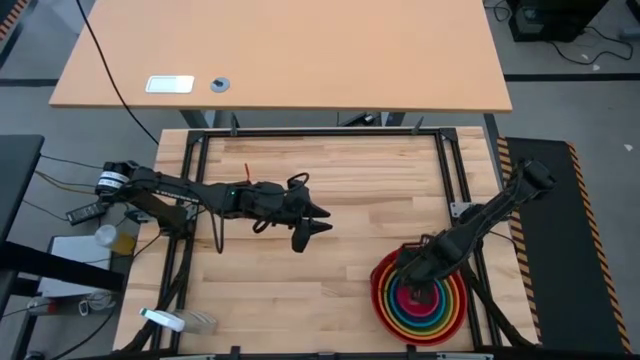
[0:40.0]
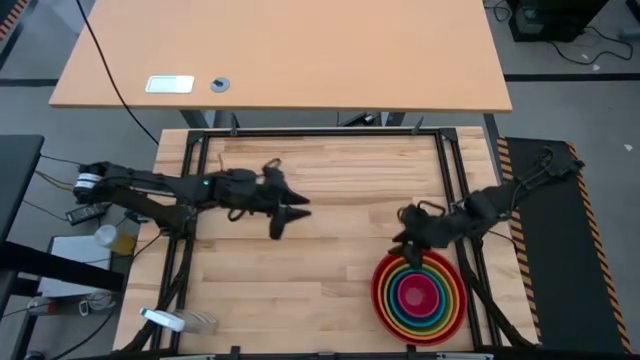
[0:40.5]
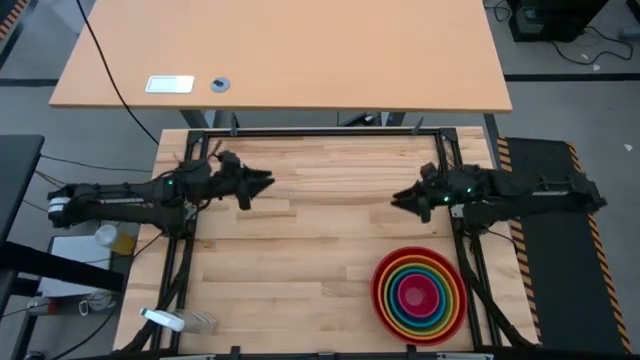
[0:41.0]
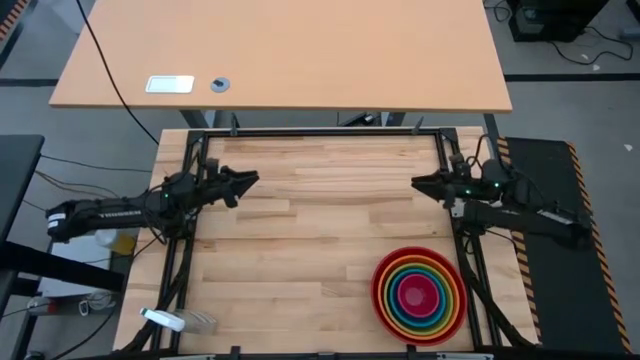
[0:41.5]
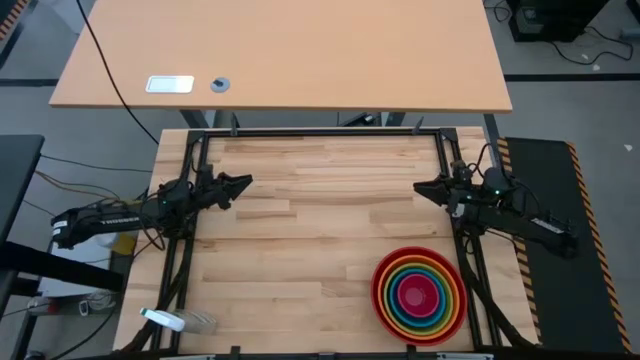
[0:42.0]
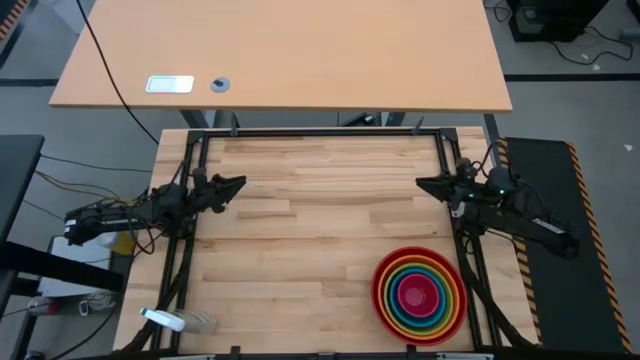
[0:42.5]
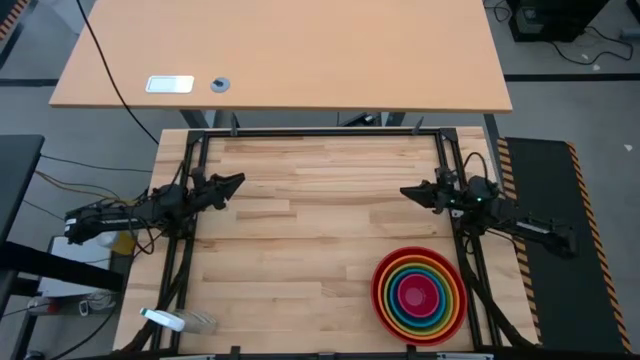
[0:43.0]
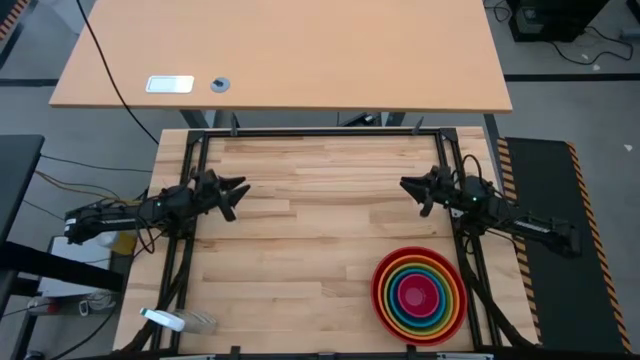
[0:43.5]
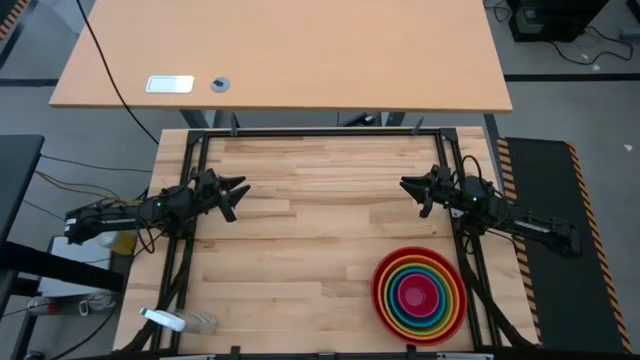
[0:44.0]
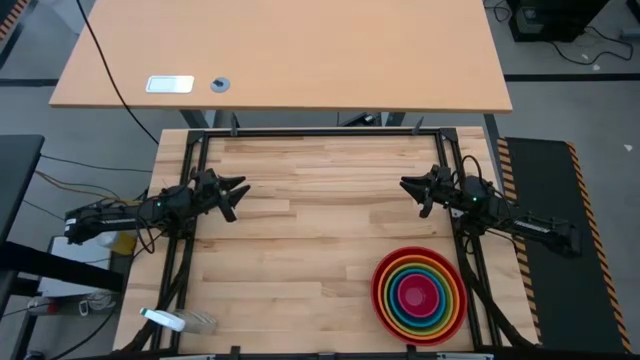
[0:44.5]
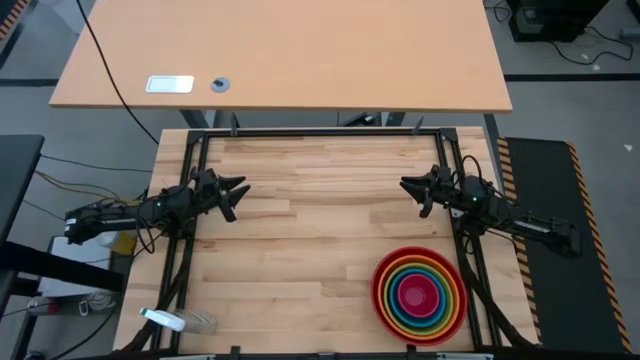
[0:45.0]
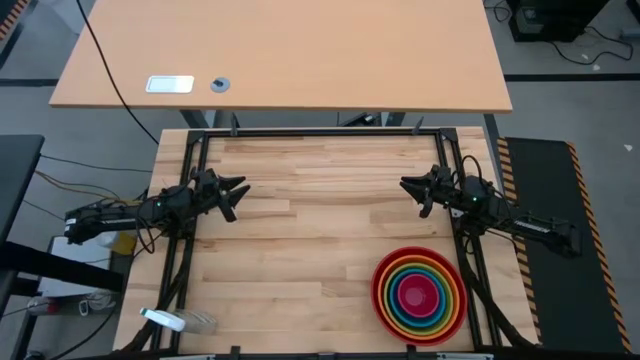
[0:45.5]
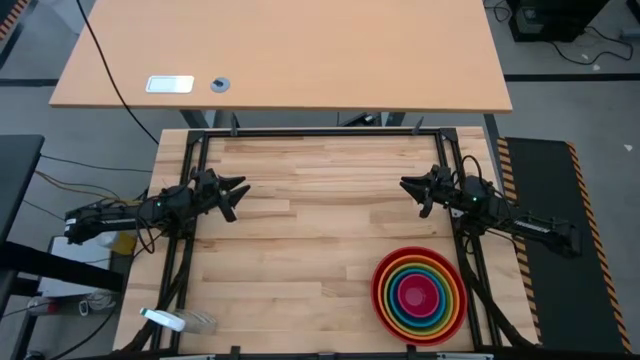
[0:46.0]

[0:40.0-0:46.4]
Return To Home Position

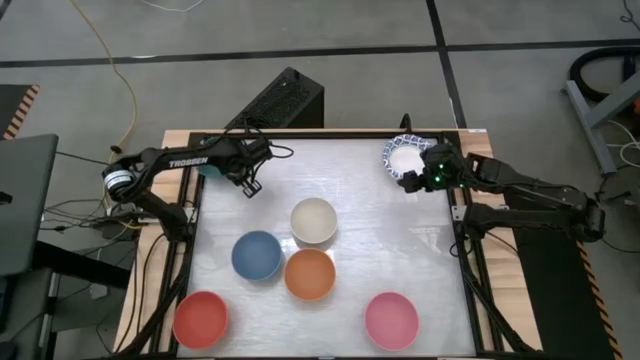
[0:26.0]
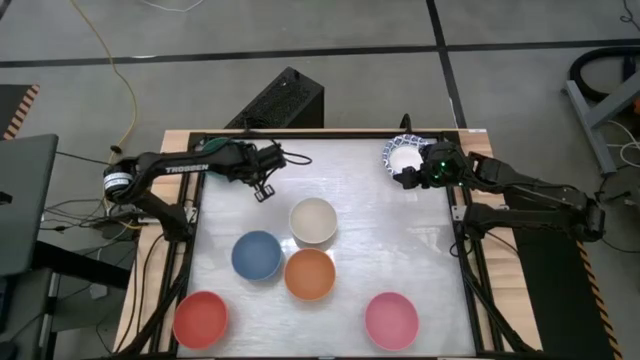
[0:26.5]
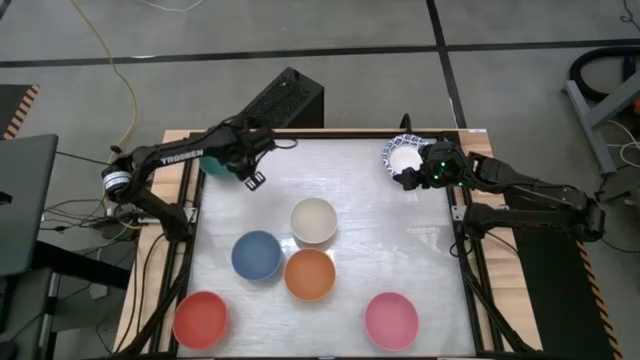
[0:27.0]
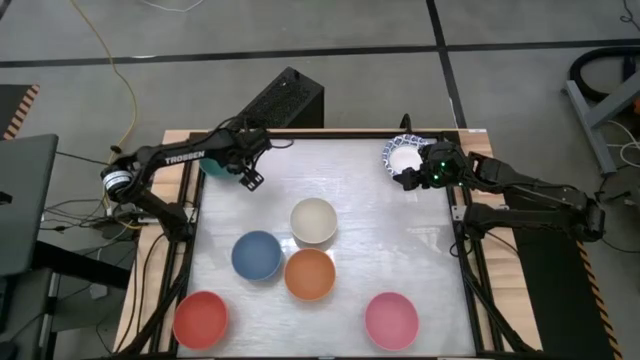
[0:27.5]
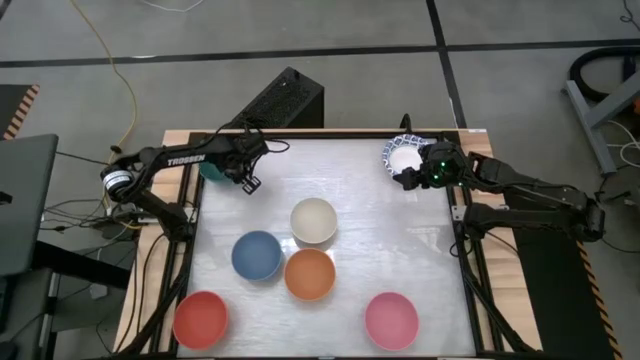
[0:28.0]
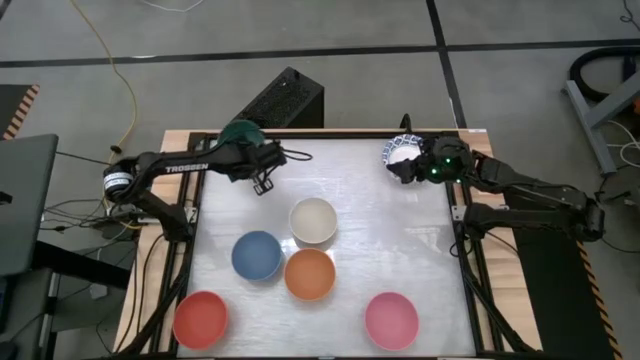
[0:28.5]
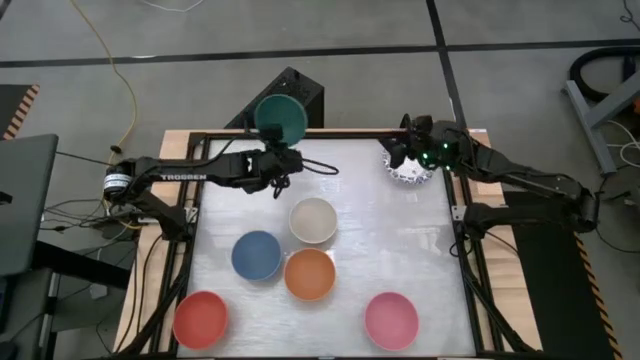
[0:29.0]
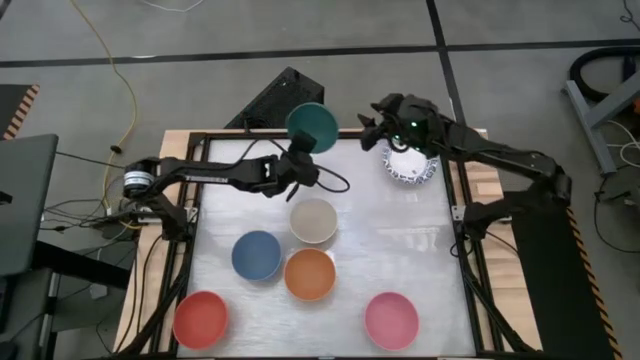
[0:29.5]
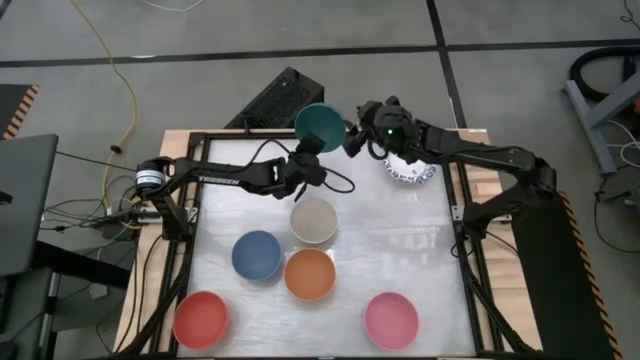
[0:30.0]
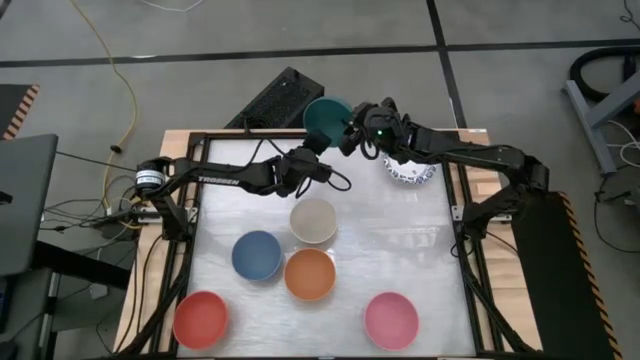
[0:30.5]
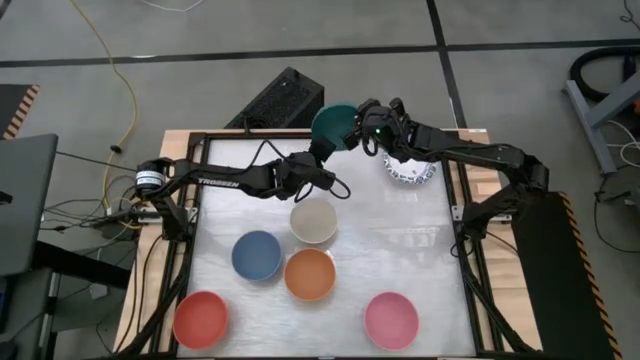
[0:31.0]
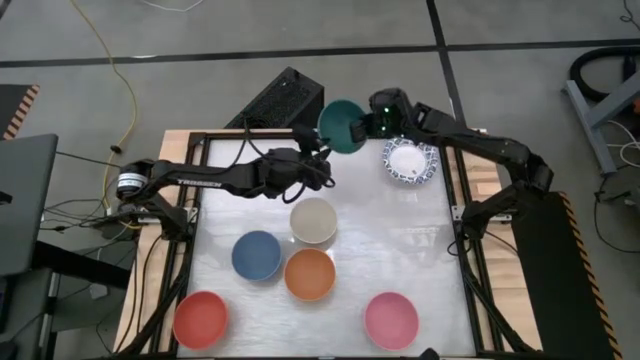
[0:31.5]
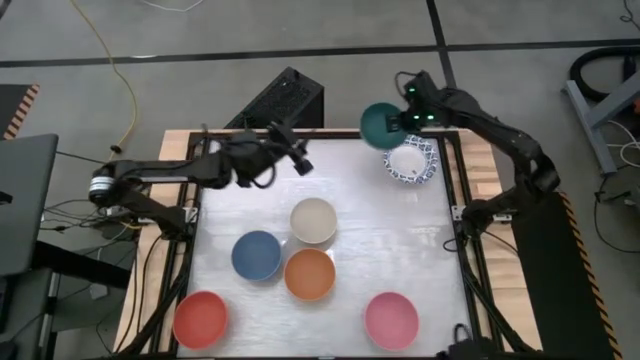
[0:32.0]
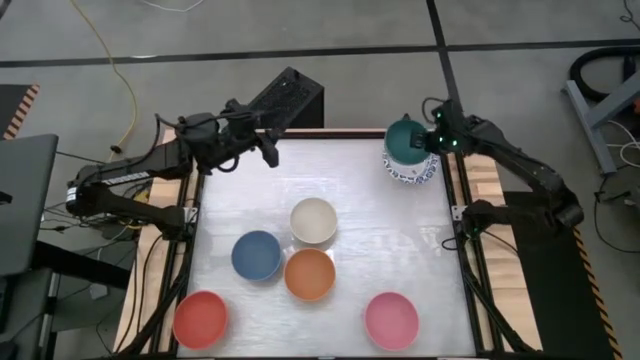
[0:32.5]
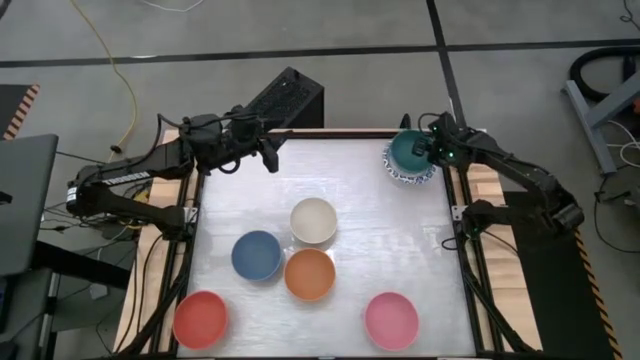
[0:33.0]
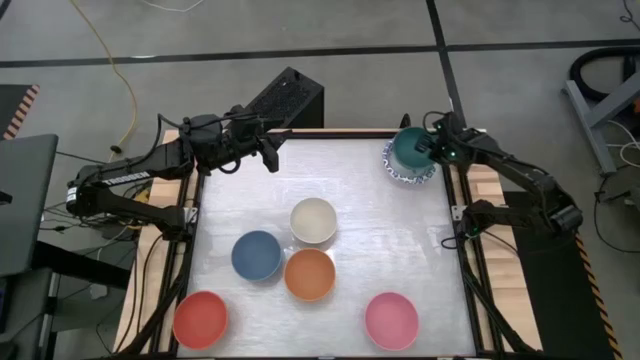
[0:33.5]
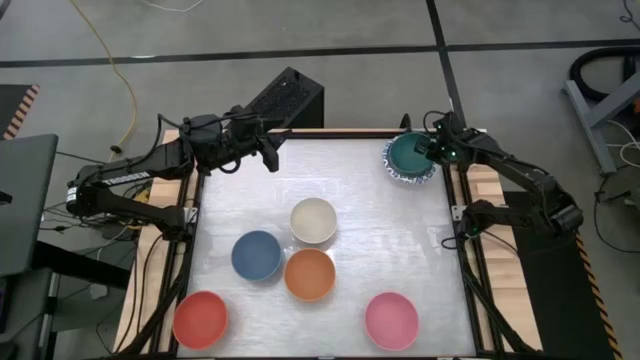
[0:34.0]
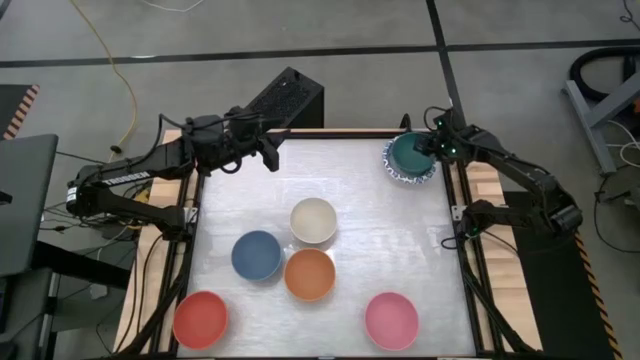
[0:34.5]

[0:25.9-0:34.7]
Stack the green bowl into the blue patterned paper bowl

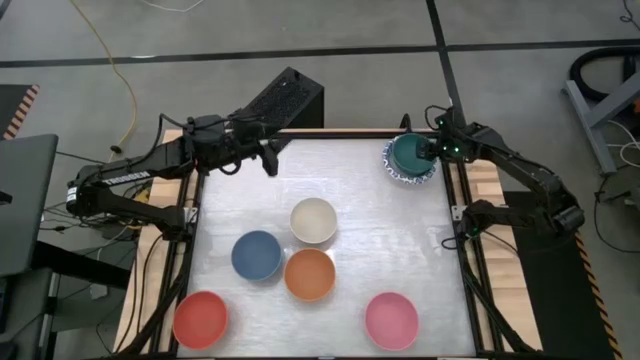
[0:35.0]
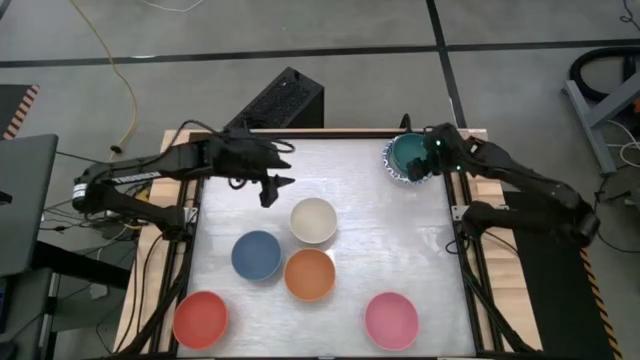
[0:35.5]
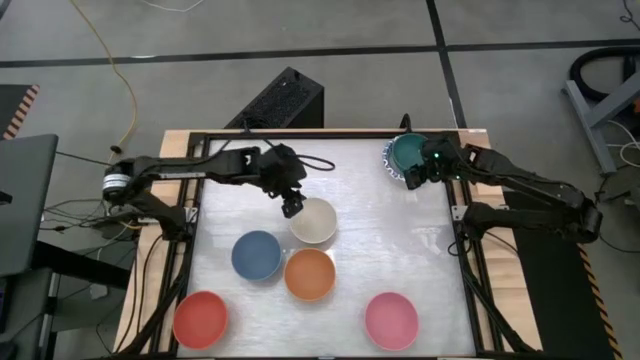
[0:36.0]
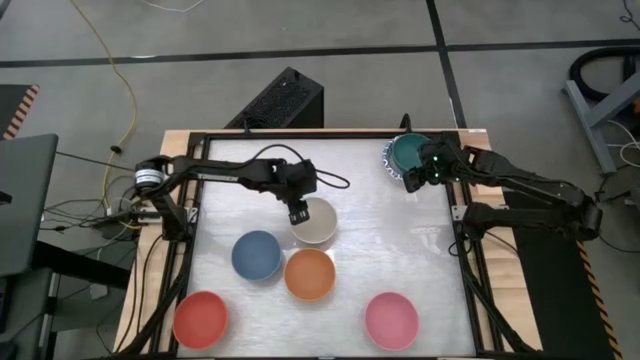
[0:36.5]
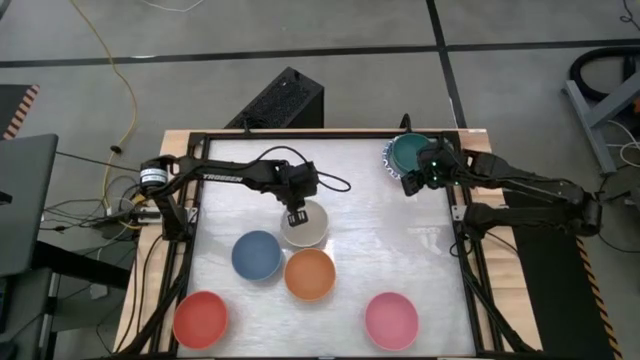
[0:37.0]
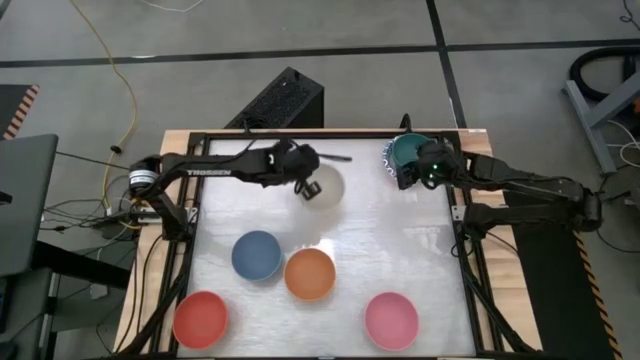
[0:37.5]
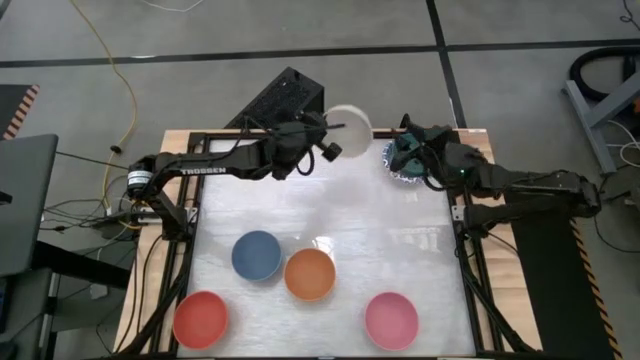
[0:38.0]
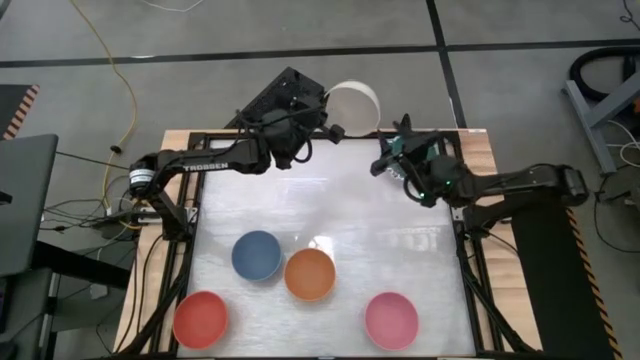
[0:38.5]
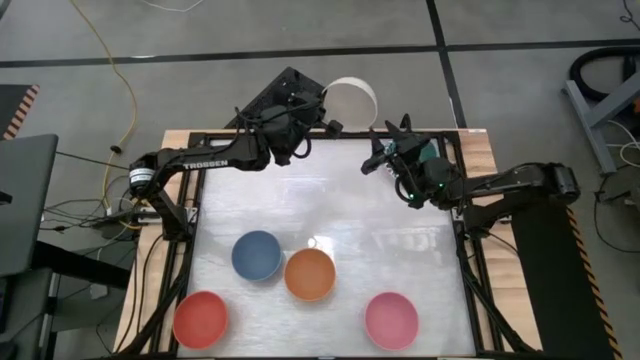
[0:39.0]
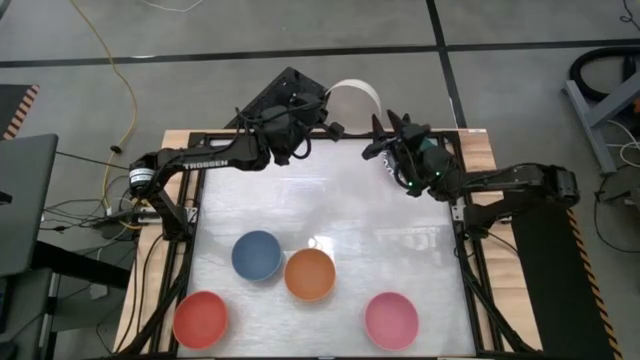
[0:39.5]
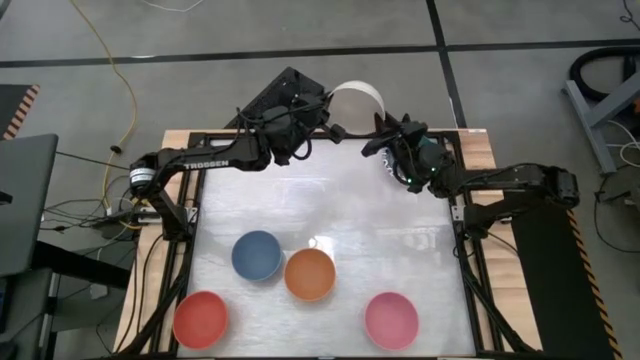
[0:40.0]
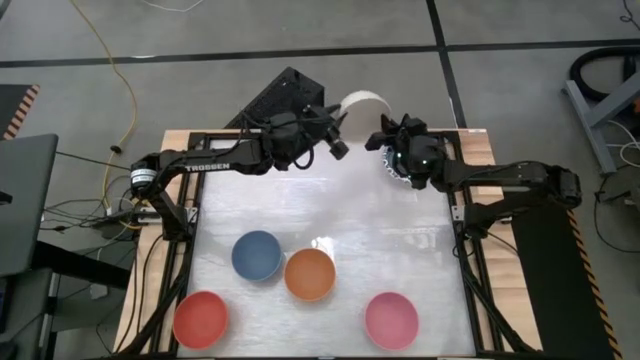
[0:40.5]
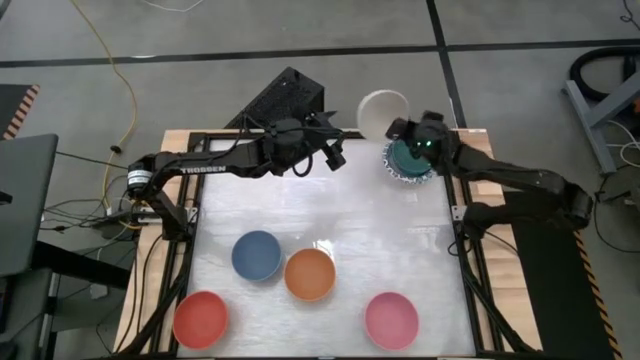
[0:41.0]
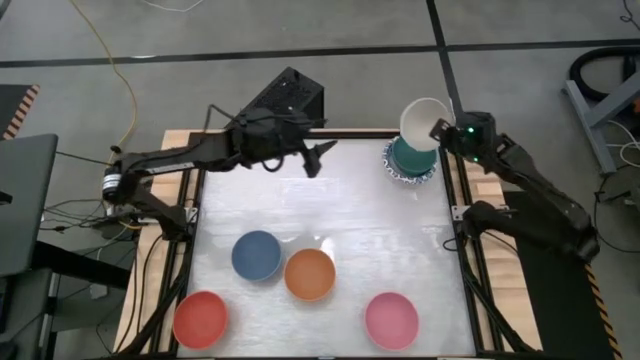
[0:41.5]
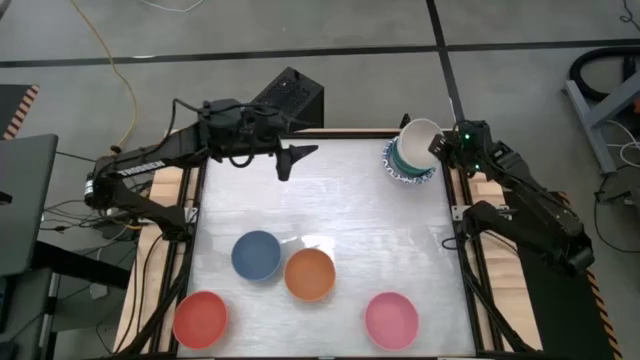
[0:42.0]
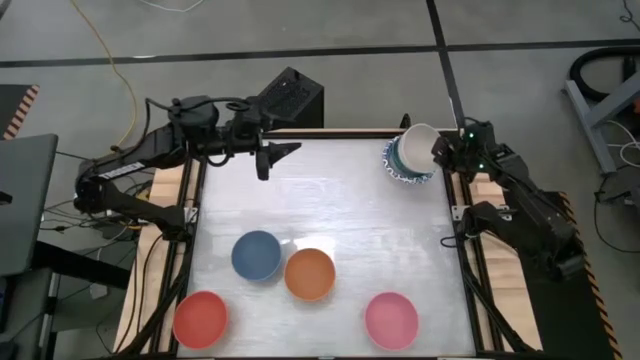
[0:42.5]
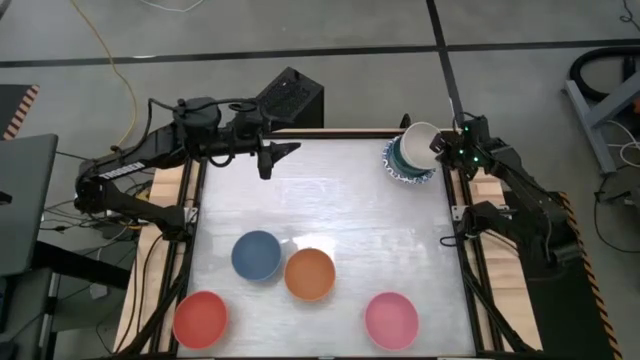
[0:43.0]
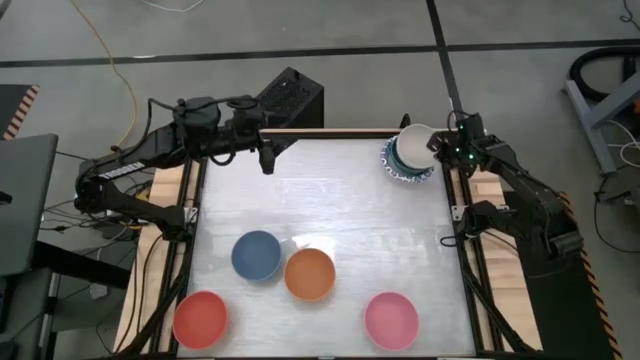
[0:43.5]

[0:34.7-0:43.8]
Stack the white bowl into the green bowl
